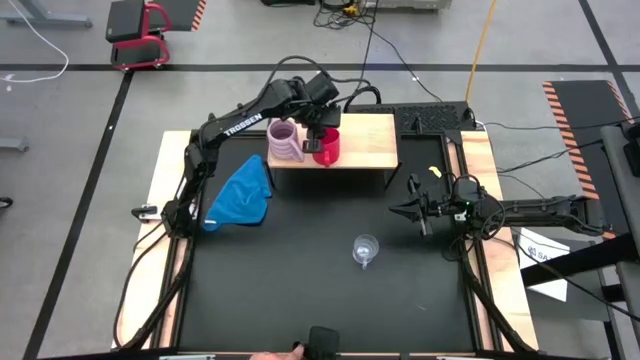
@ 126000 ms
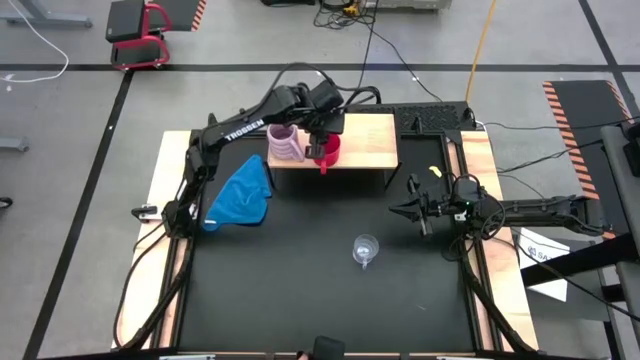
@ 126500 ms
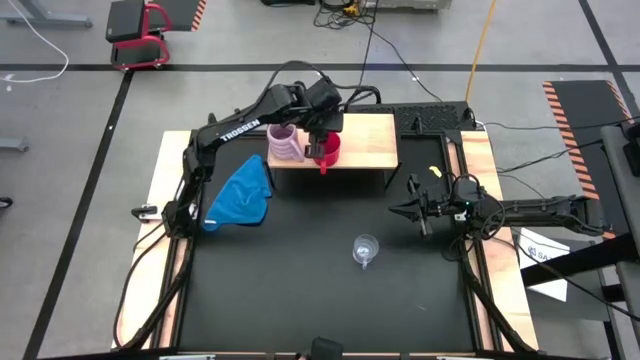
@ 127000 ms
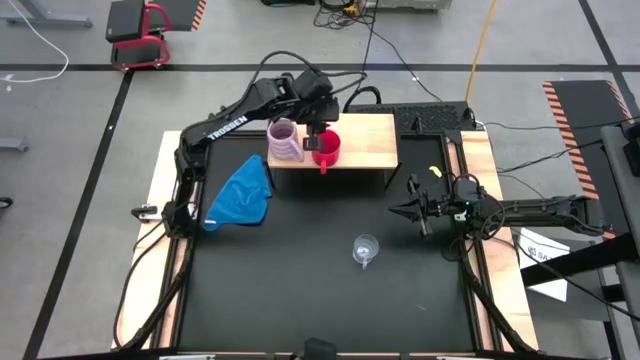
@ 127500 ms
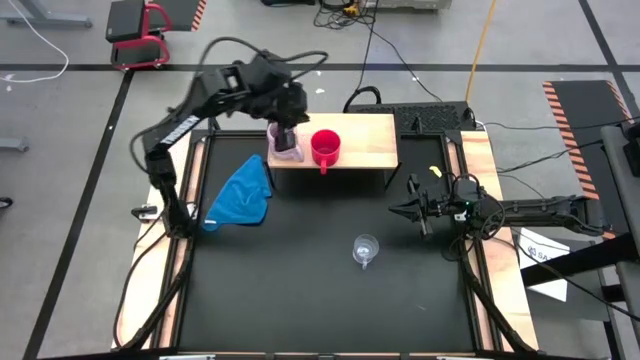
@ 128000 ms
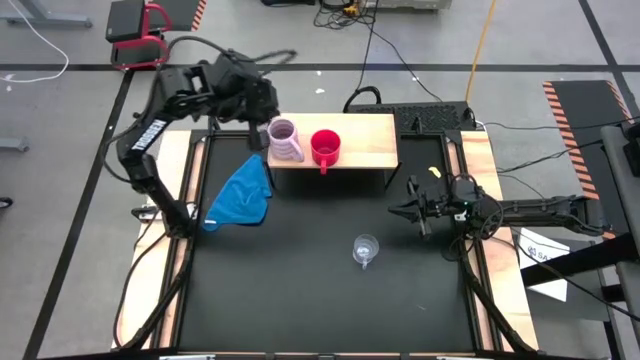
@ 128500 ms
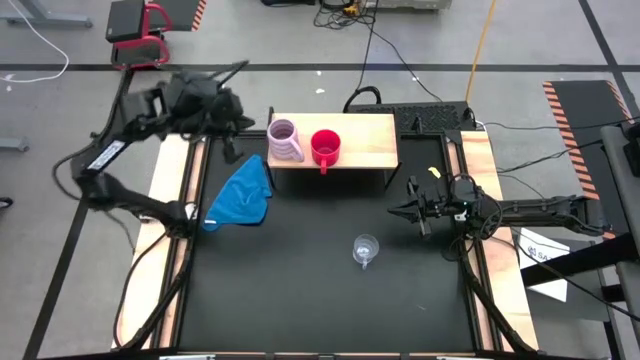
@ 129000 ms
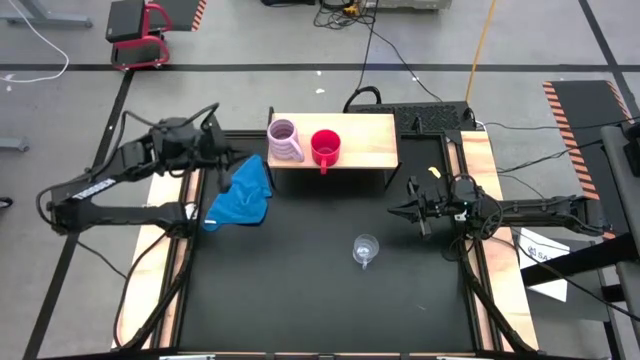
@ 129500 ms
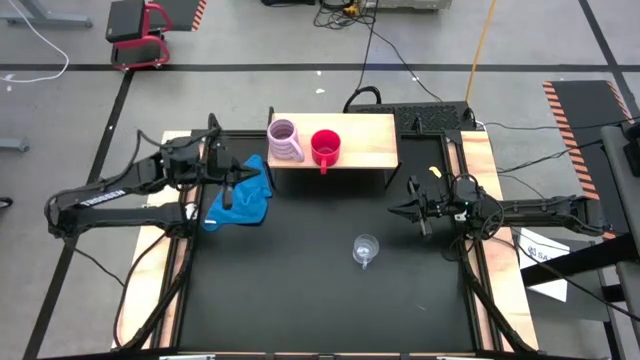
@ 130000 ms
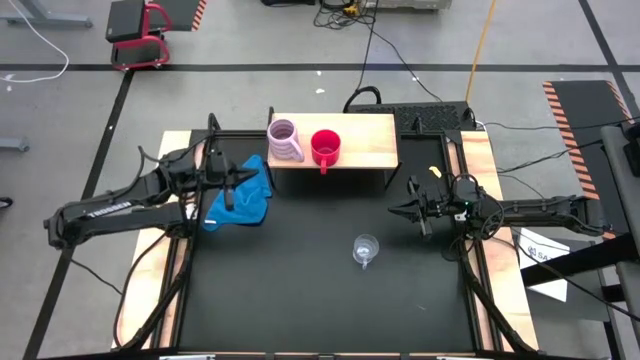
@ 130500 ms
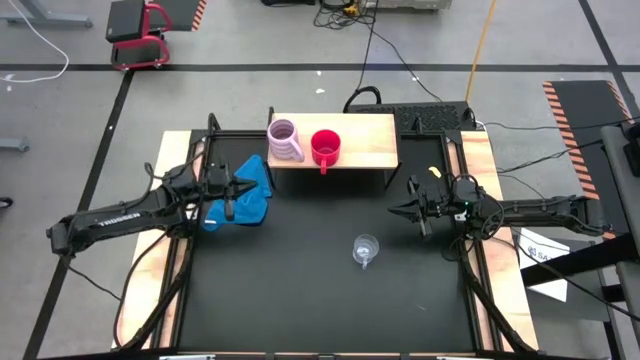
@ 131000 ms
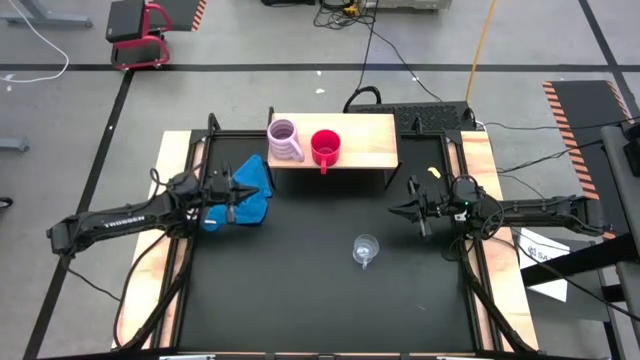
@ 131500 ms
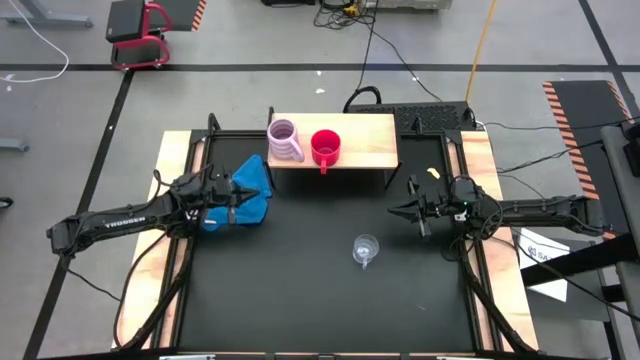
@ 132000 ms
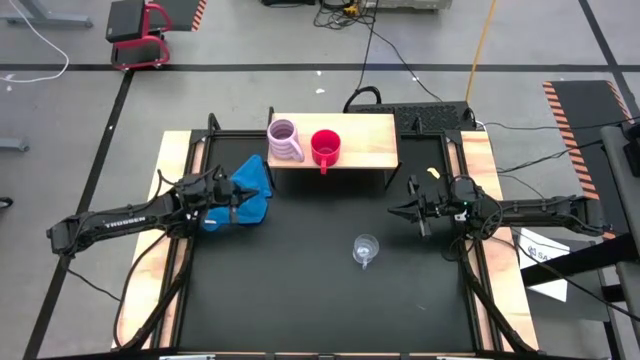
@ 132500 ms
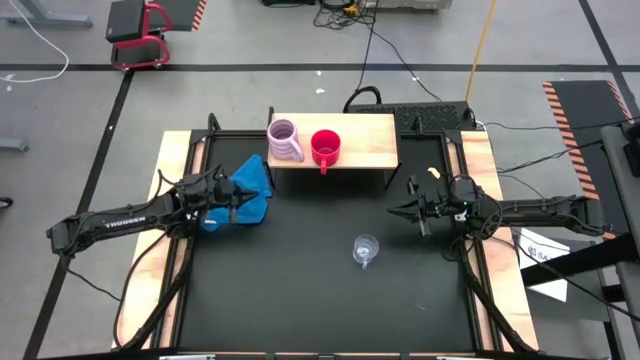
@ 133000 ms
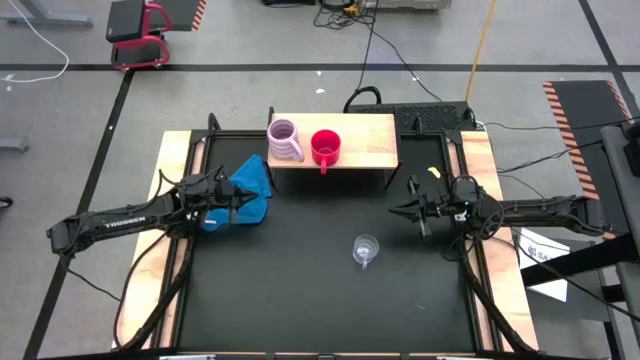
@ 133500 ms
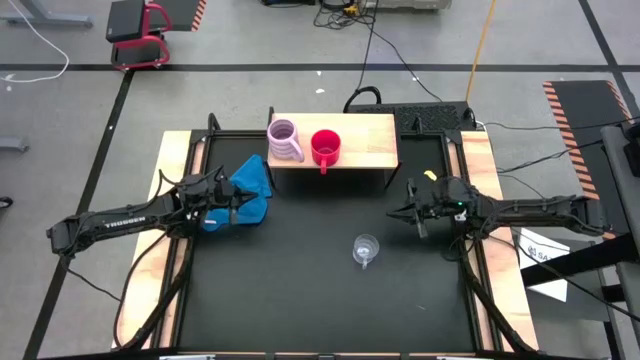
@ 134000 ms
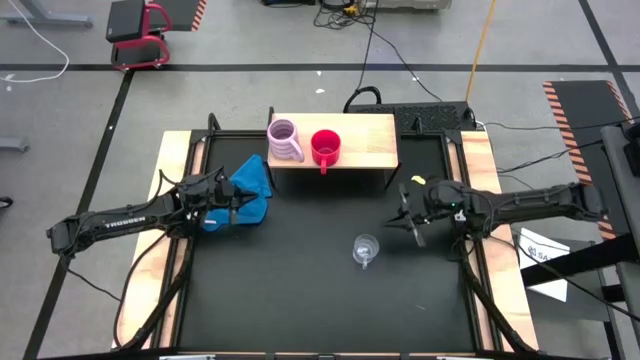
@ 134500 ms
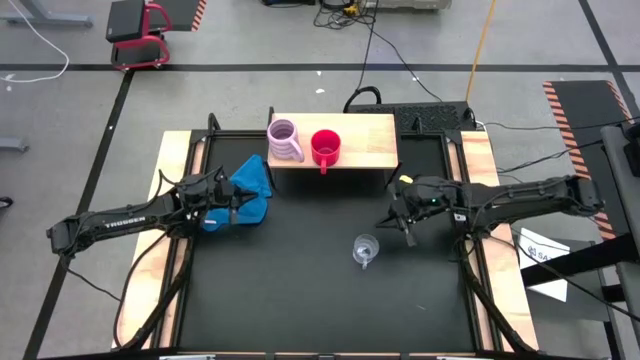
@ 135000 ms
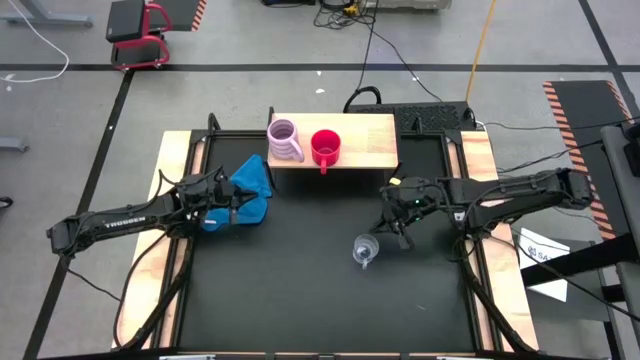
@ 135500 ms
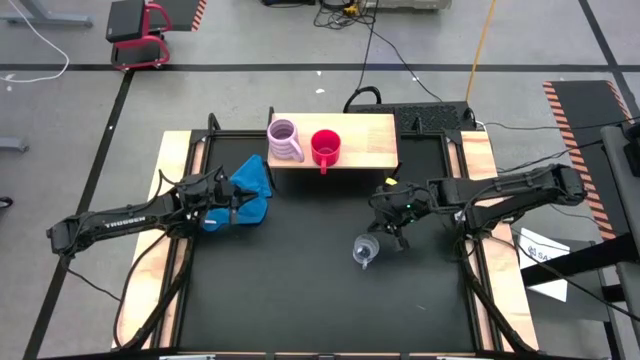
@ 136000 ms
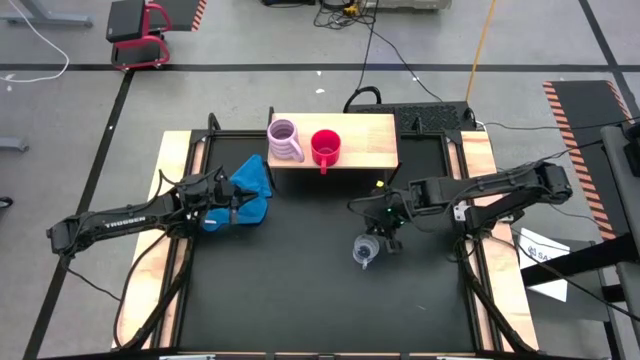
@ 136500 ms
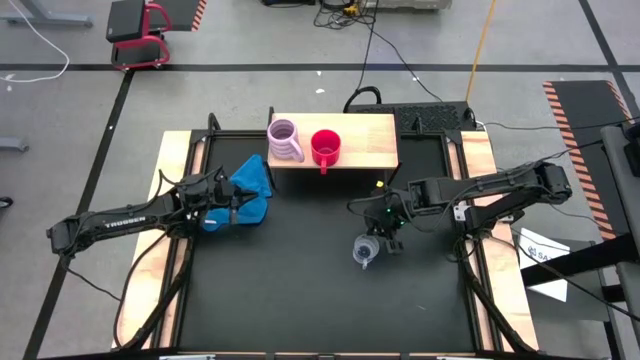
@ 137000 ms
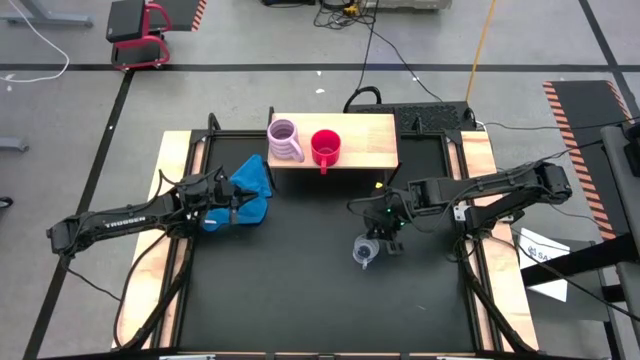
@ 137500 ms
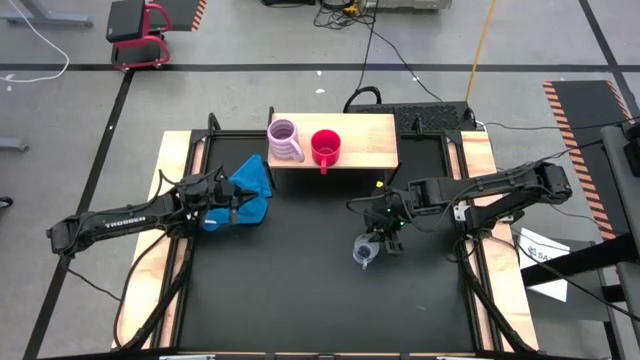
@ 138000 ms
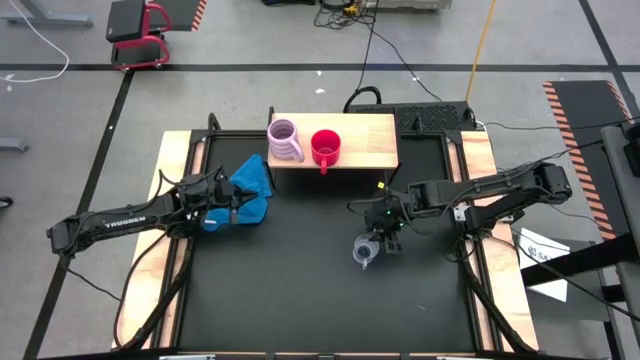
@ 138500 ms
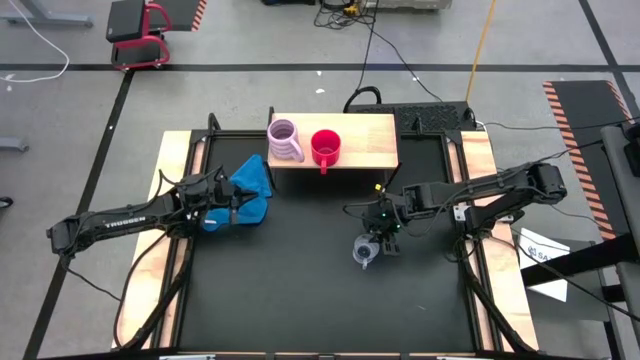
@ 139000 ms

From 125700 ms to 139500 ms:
Task: Stack small to large cups/mugs on shelf
Put the transparent mug on the shelf

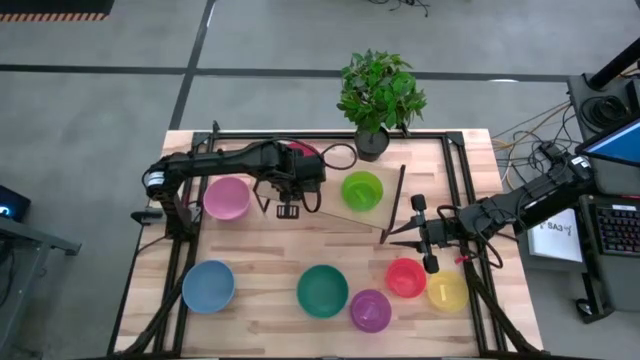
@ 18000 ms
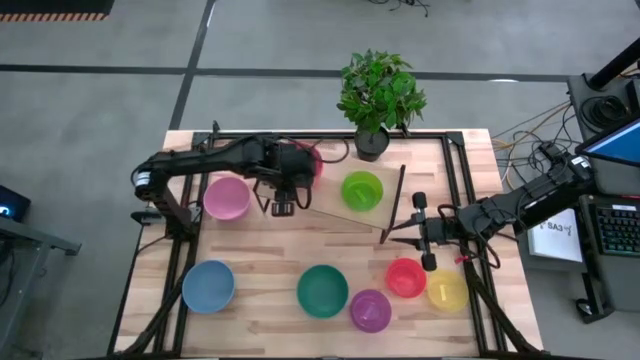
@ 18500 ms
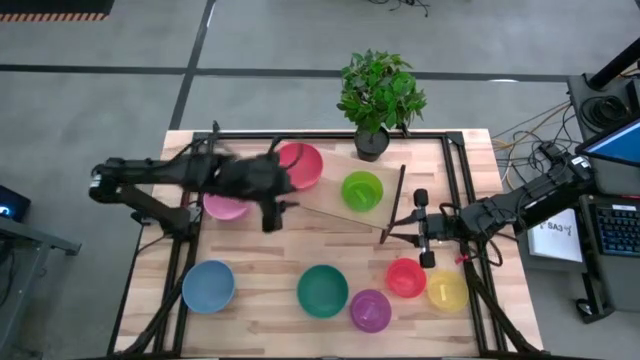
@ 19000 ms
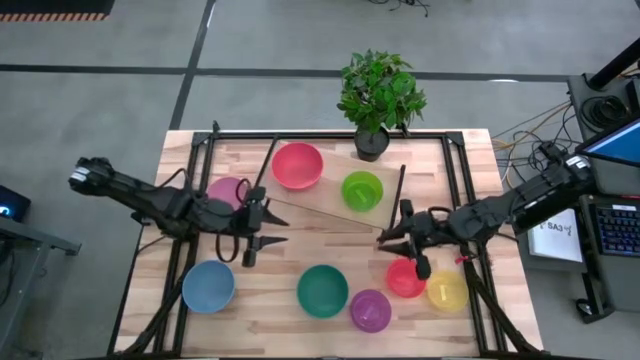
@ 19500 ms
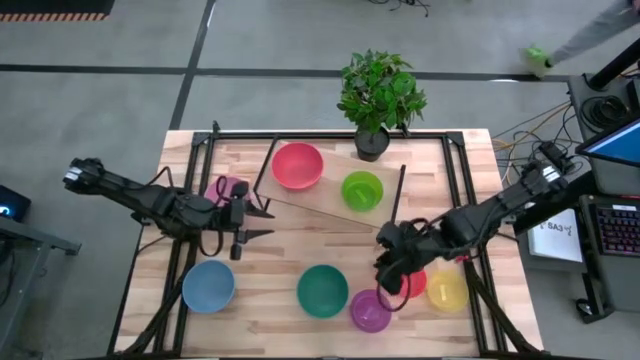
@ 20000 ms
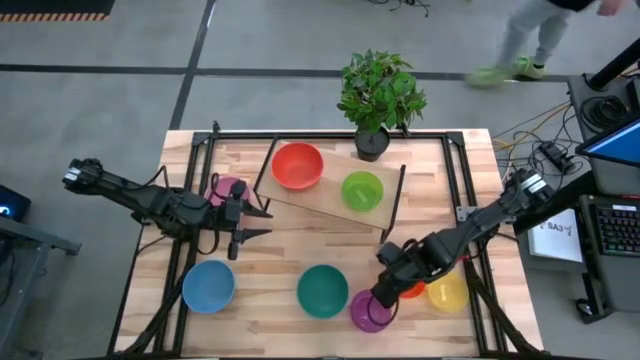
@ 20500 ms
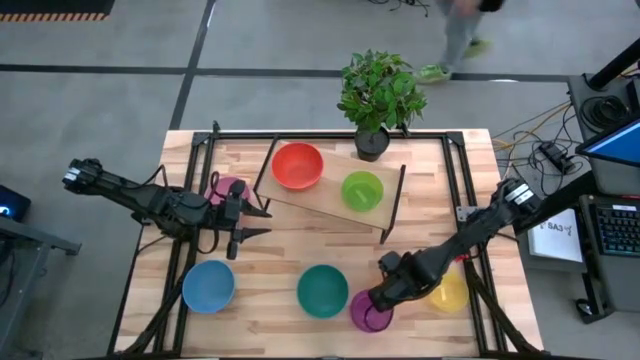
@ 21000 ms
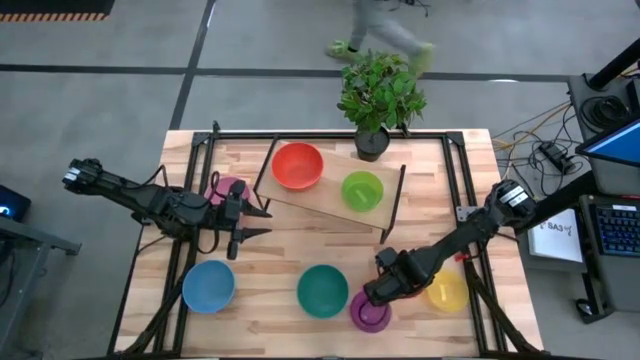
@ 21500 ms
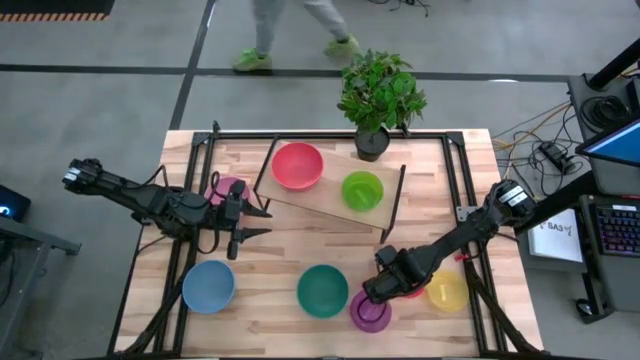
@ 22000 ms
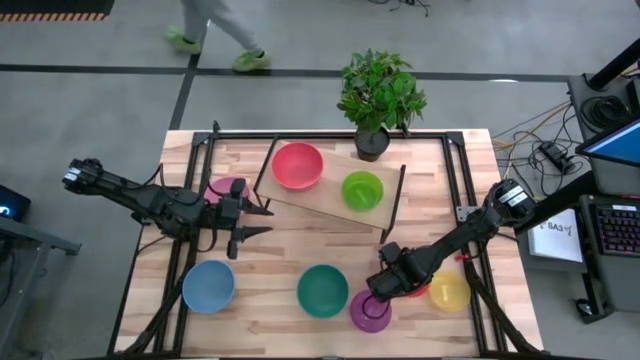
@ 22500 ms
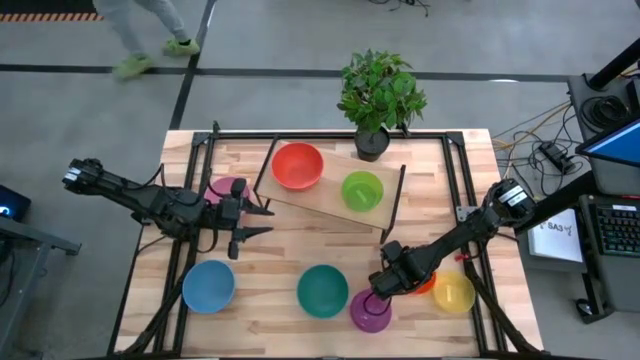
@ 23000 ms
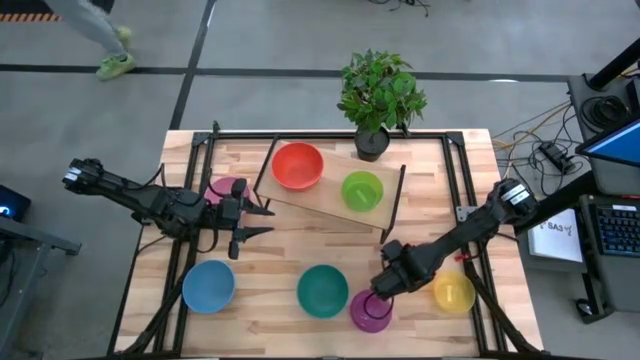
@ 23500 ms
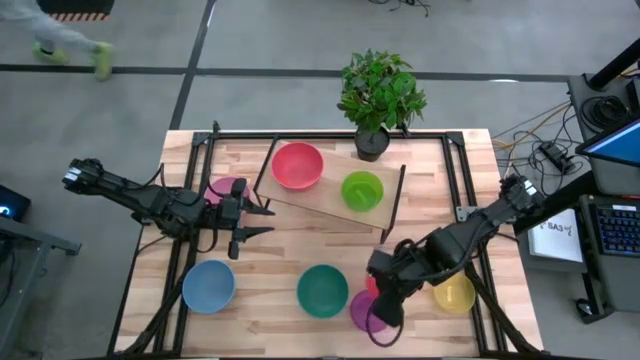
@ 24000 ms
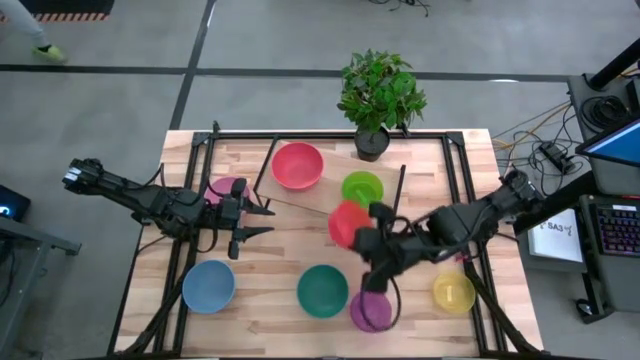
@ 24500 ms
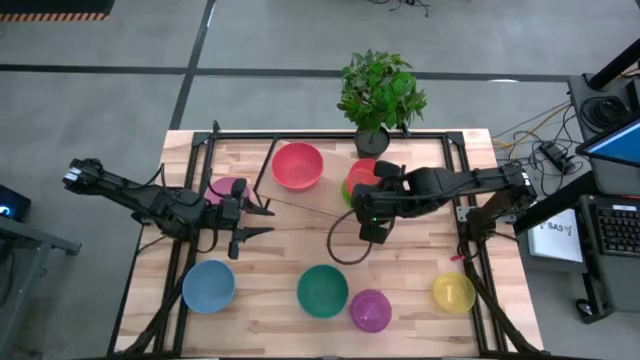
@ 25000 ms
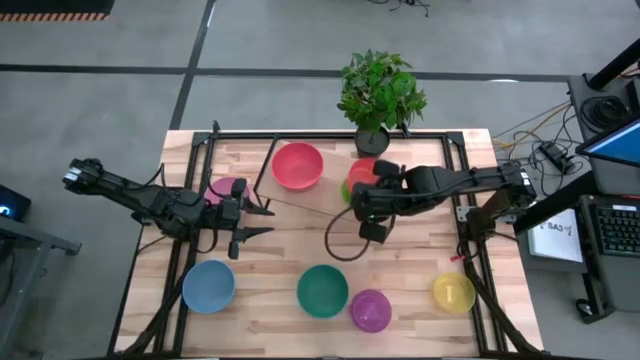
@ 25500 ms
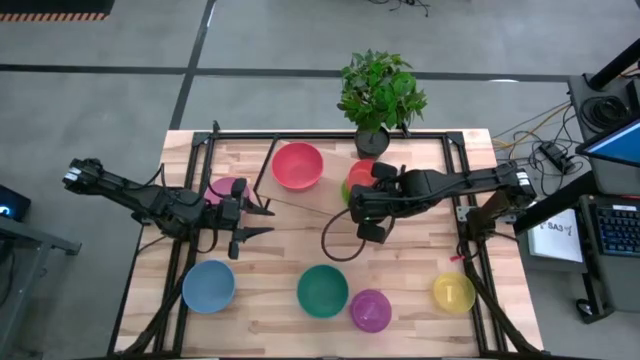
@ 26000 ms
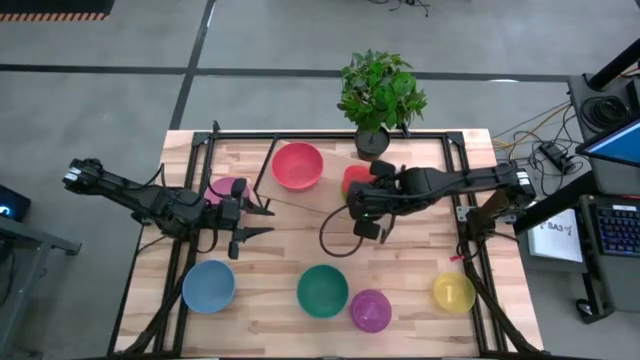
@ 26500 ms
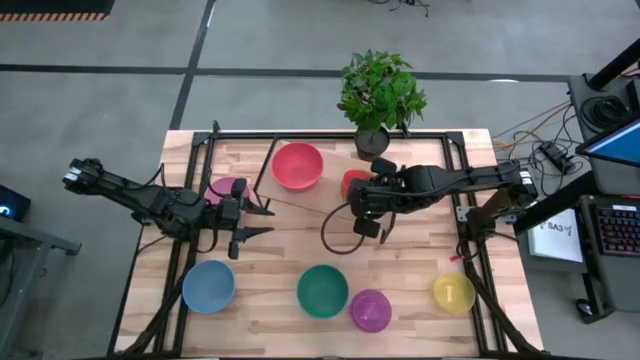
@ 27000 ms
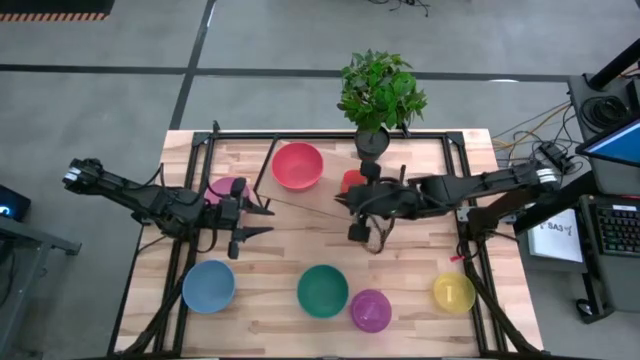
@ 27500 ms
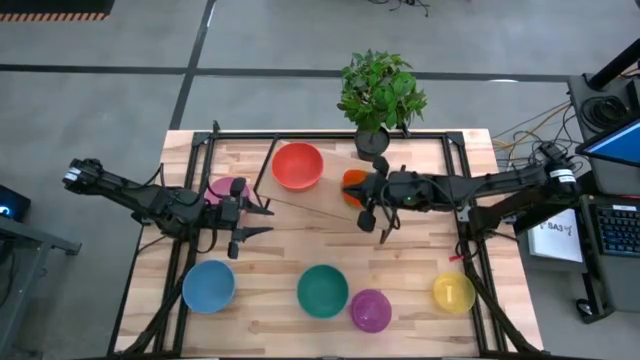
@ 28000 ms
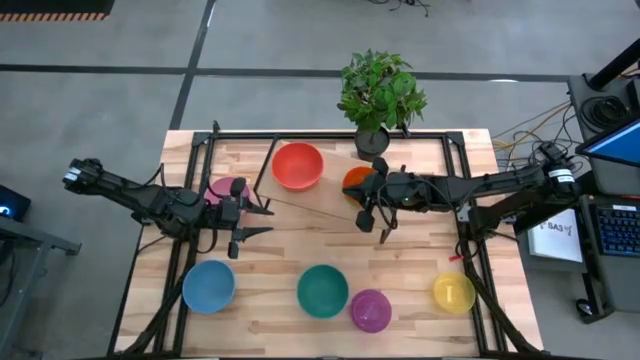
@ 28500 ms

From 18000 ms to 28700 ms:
Task: Place and stack bowls onto a shelf
Stack the light orange bowl on top of the green bowl on the shelf
